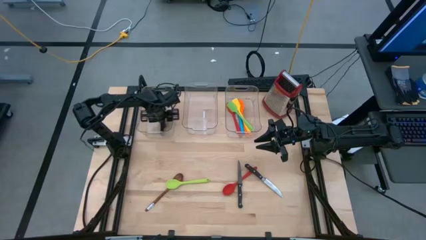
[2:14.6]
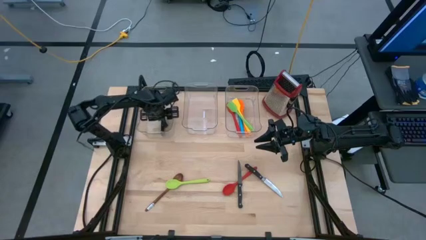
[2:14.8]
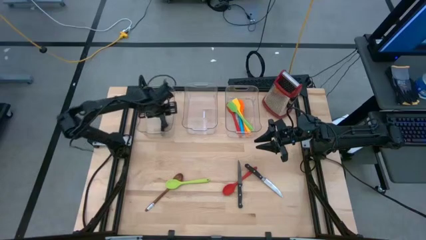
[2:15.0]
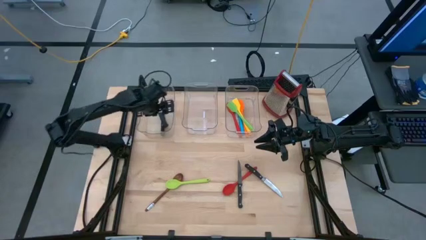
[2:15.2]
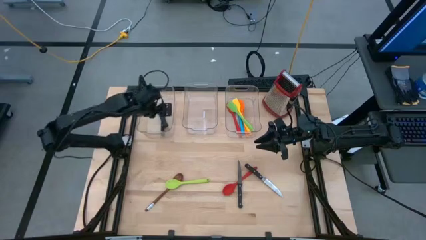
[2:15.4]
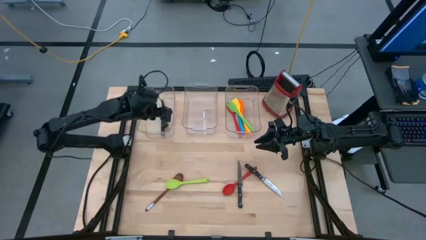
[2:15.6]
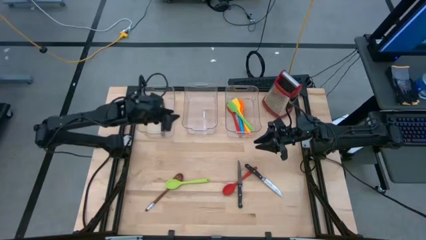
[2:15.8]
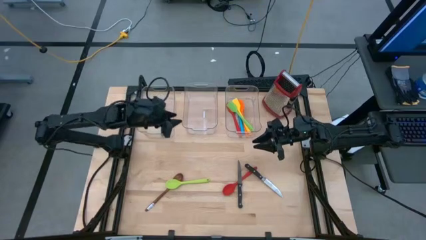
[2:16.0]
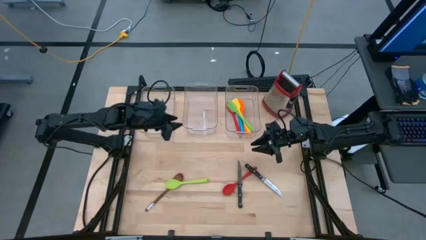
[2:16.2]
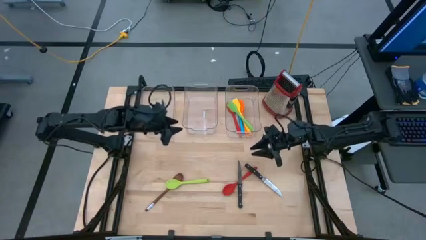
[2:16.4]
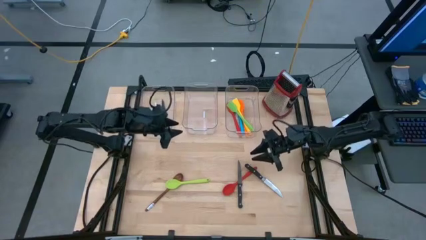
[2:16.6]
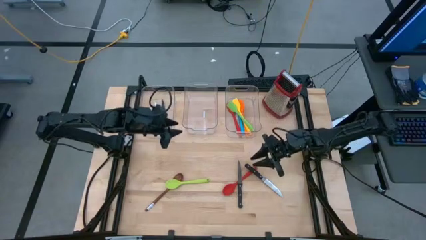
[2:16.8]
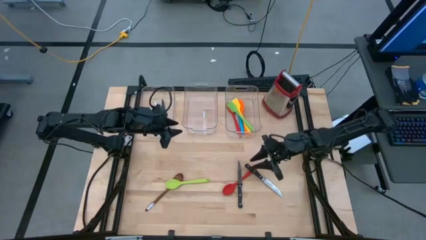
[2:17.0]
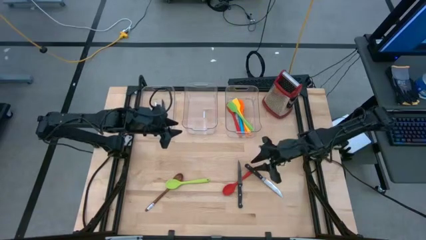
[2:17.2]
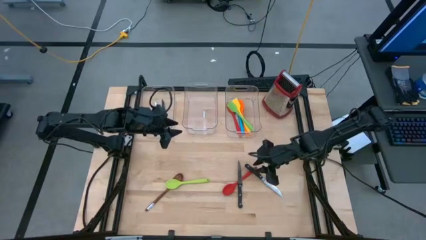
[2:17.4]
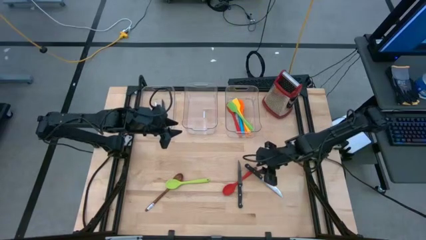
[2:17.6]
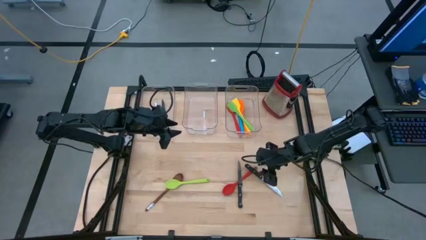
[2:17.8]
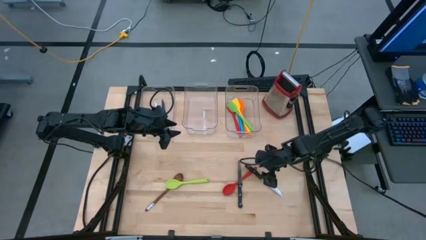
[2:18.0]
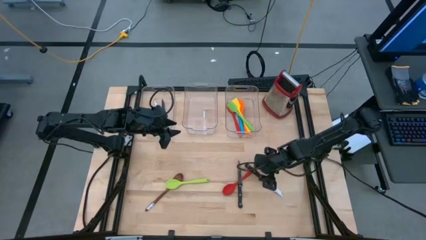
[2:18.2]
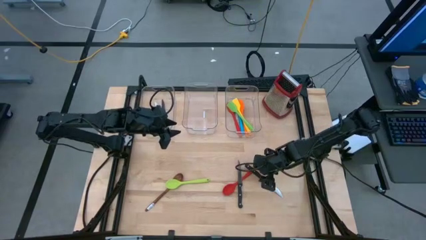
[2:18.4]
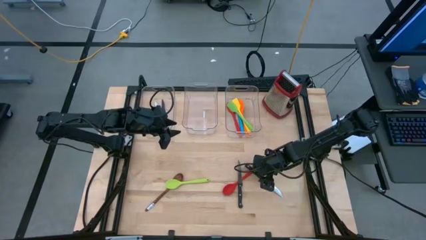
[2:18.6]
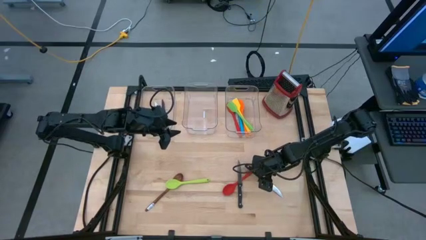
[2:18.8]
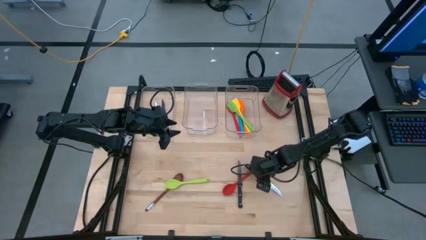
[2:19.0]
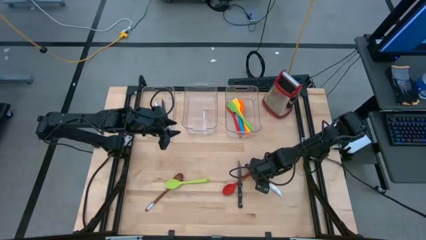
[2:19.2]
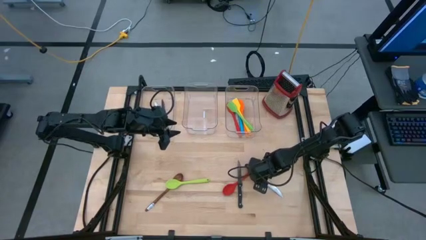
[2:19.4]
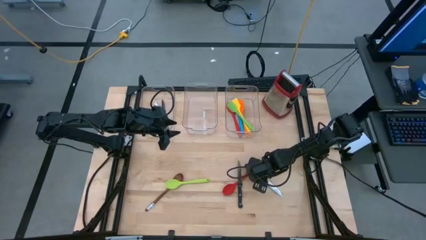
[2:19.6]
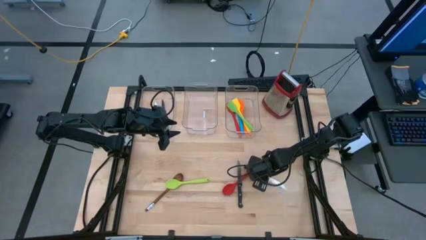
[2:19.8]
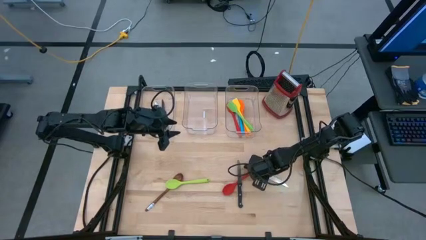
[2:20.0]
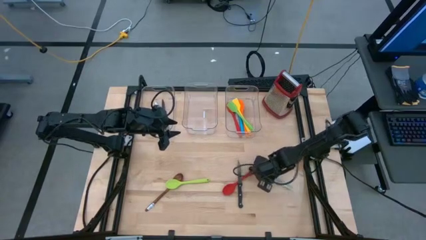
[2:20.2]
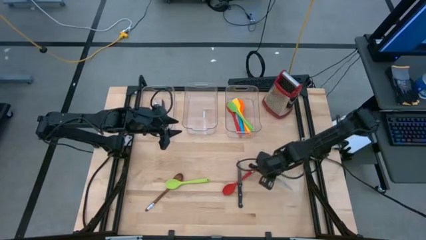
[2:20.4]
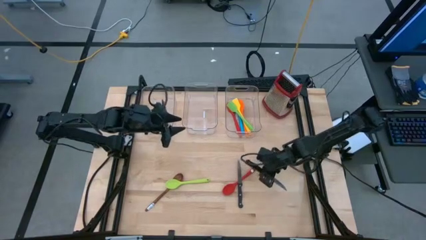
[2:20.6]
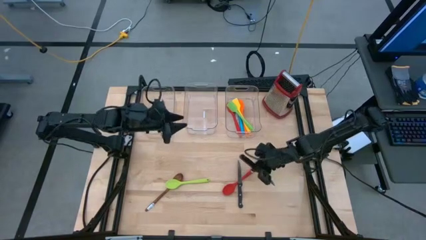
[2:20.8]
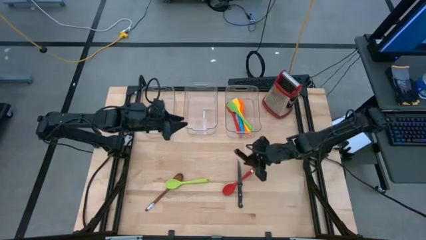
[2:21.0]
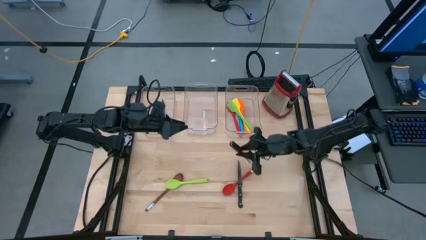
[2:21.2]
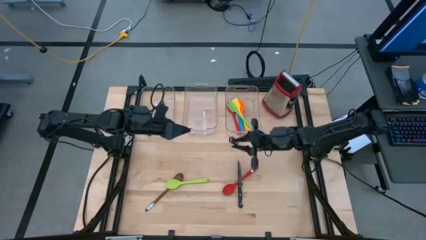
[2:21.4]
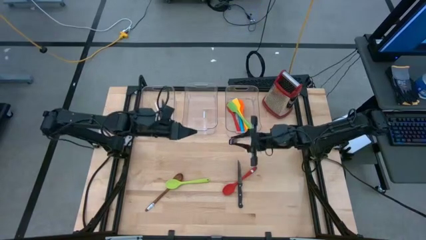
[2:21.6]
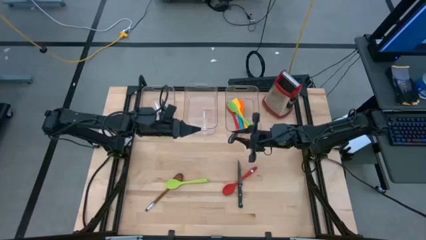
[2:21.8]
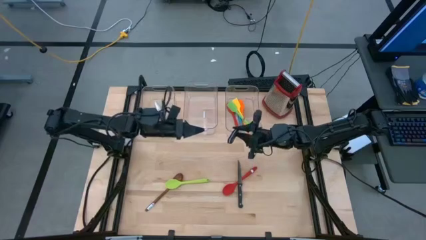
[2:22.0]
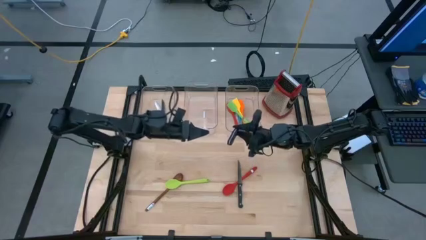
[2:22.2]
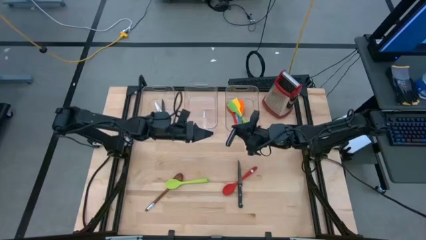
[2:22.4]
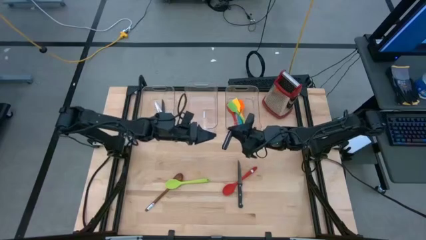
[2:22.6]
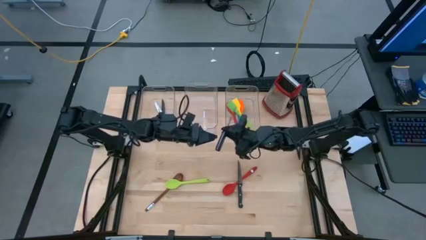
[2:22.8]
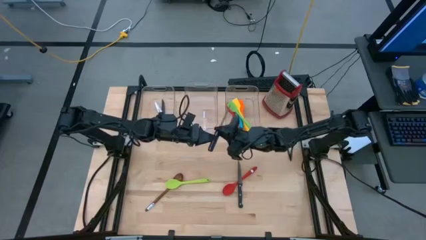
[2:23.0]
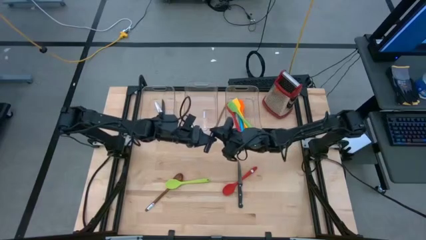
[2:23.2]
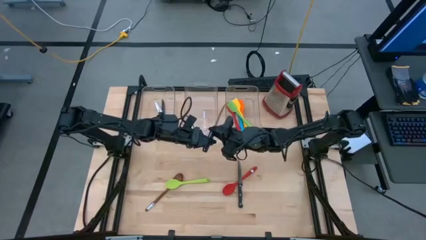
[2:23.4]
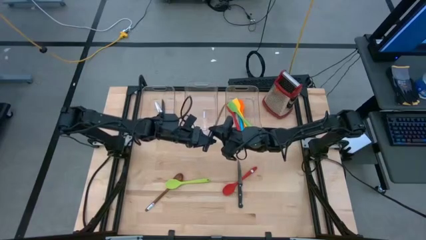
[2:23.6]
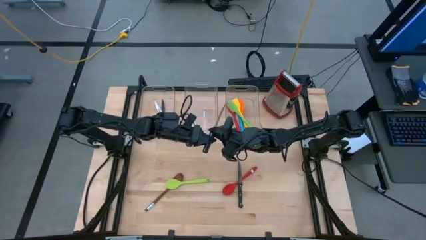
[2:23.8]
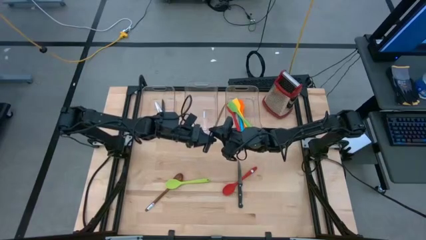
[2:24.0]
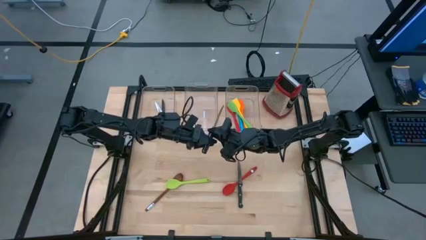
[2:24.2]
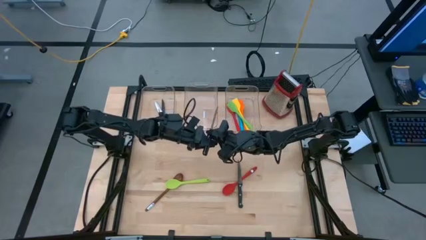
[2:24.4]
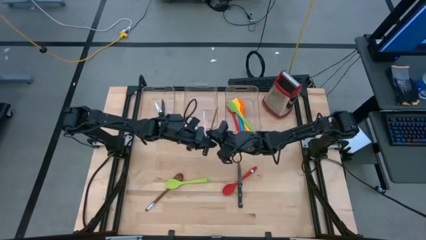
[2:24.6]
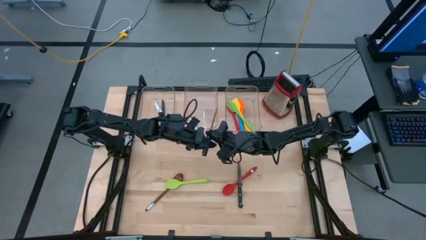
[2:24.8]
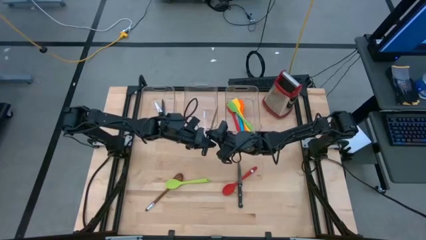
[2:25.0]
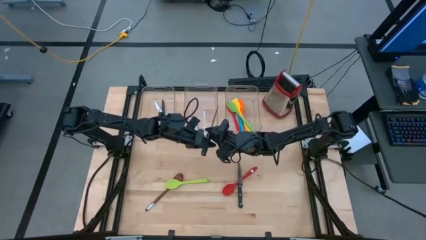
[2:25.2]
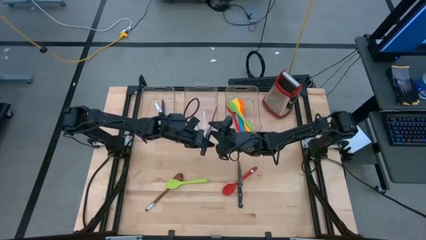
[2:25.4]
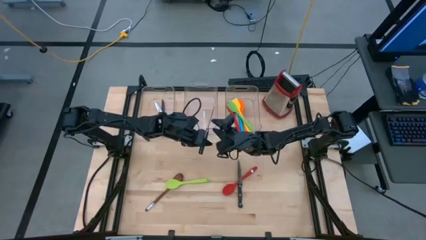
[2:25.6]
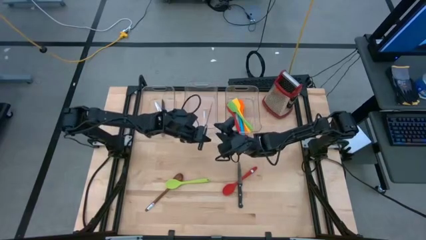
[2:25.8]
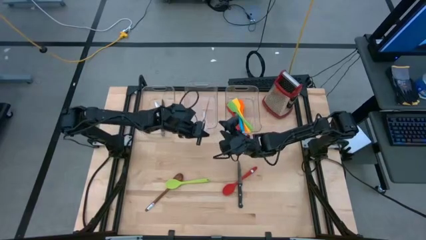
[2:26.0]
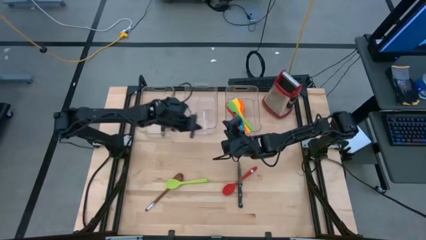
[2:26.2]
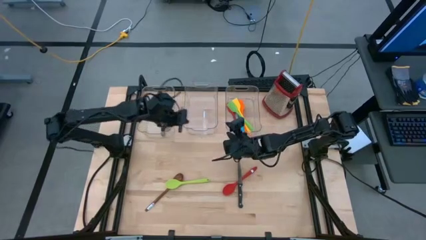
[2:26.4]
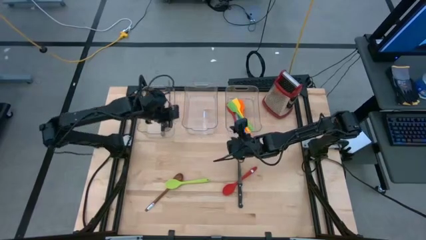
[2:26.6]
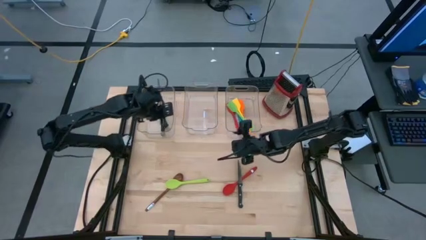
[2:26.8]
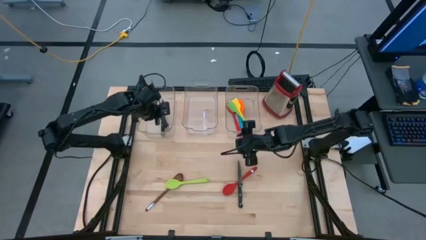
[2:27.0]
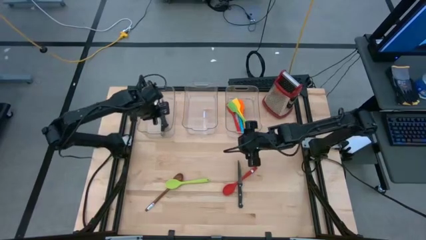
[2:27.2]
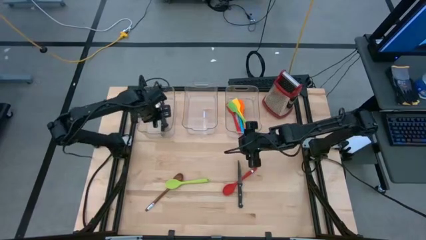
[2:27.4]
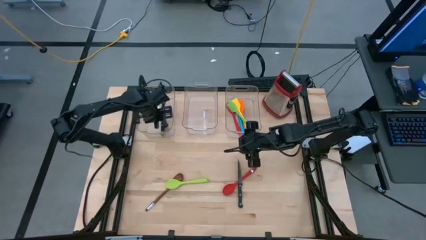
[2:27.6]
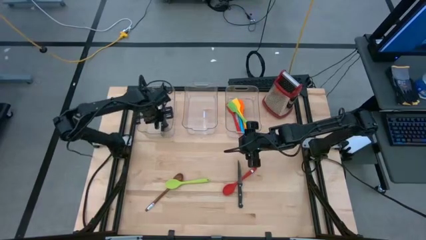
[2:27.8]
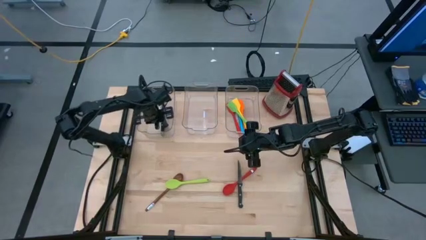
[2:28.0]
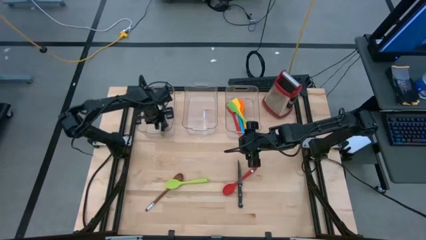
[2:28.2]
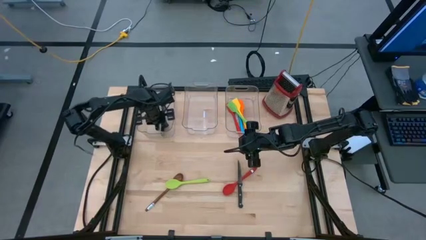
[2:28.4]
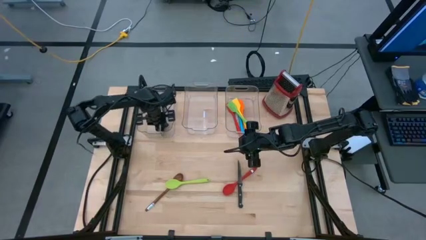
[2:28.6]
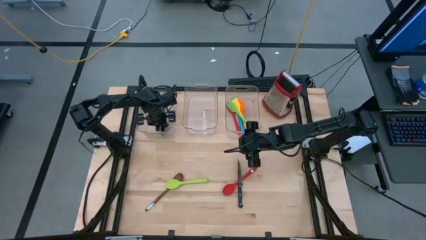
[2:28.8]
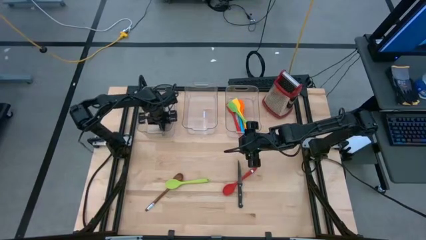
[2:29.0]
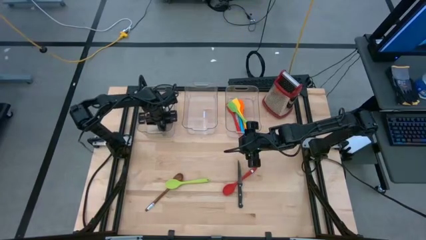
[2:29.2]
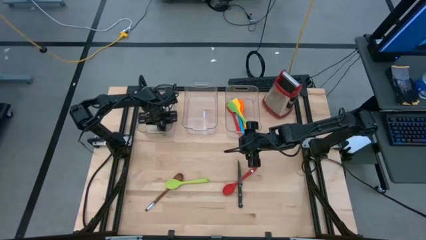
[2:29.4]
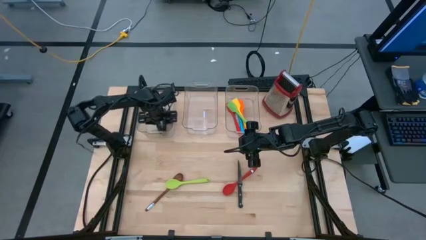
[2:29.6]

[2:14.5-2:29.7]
Task: Pick & Place Kitchen Items
Put the black knife into the left transparent bin
